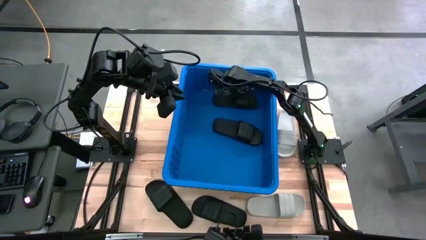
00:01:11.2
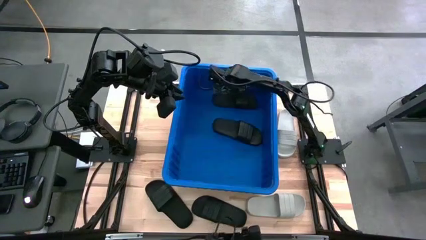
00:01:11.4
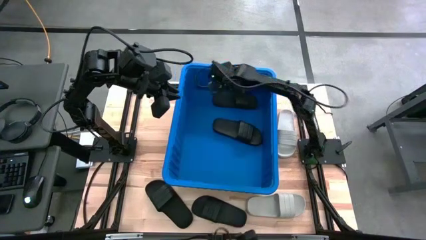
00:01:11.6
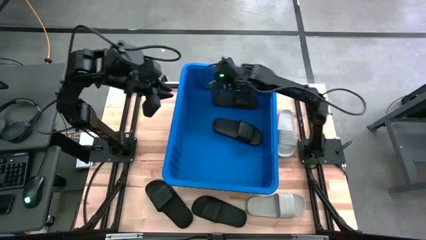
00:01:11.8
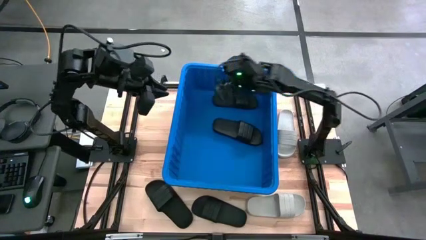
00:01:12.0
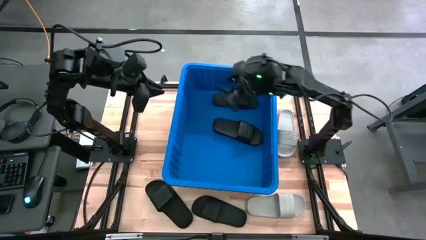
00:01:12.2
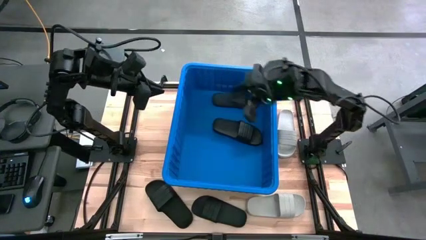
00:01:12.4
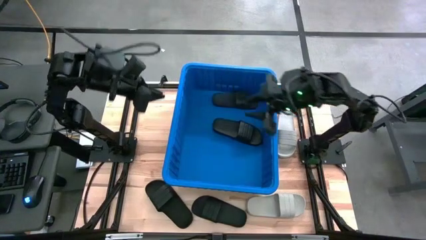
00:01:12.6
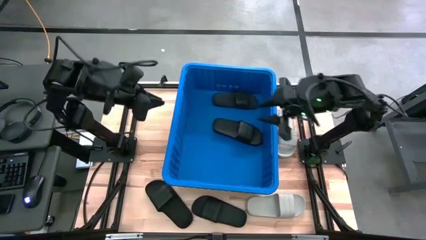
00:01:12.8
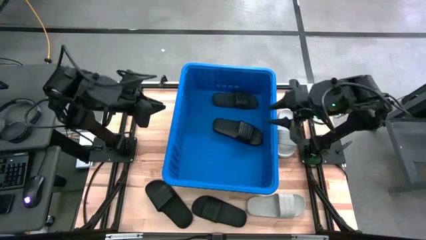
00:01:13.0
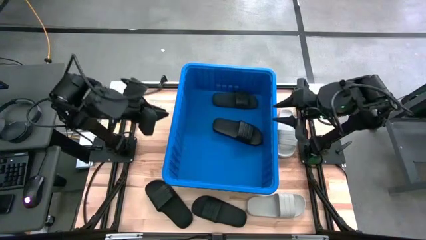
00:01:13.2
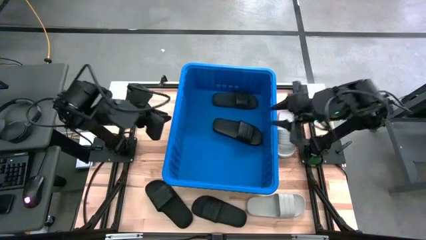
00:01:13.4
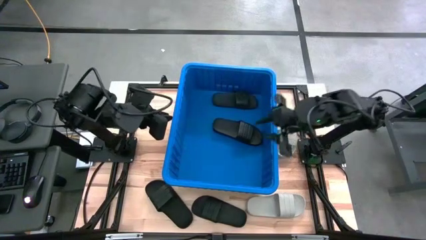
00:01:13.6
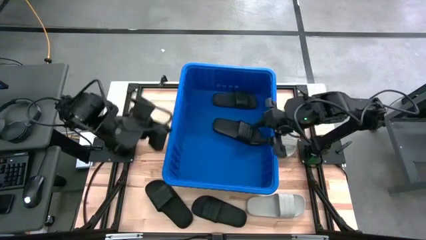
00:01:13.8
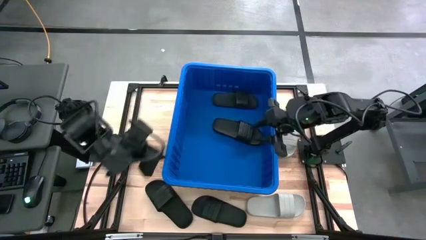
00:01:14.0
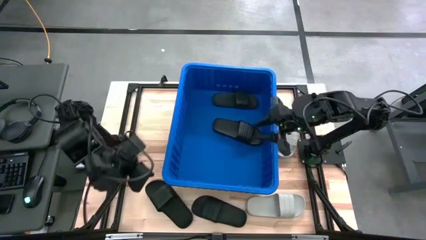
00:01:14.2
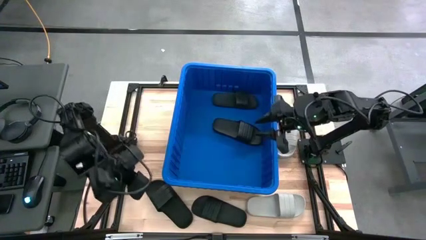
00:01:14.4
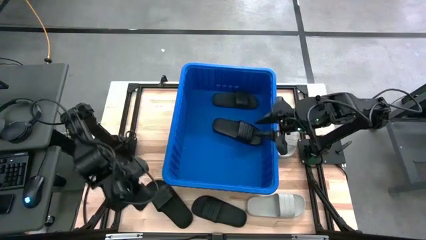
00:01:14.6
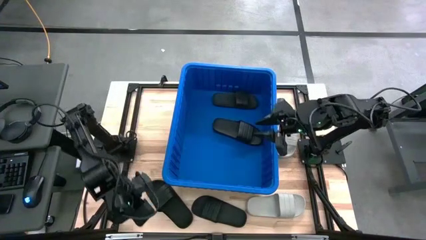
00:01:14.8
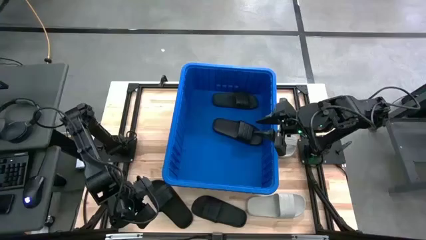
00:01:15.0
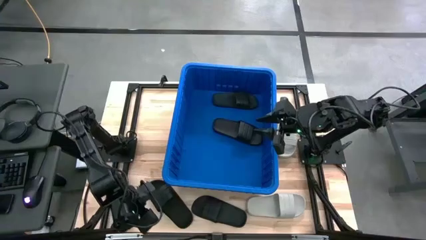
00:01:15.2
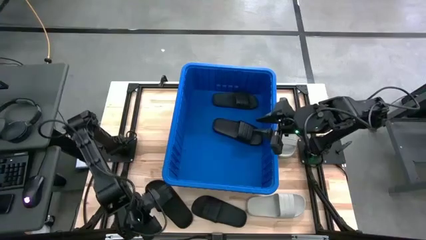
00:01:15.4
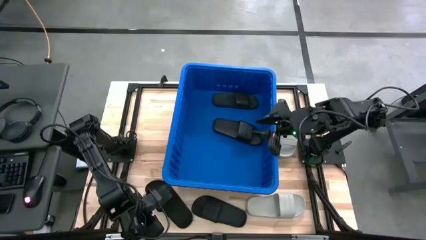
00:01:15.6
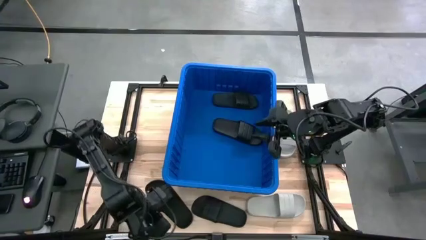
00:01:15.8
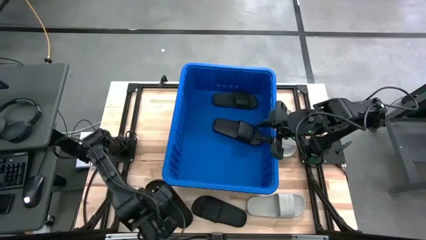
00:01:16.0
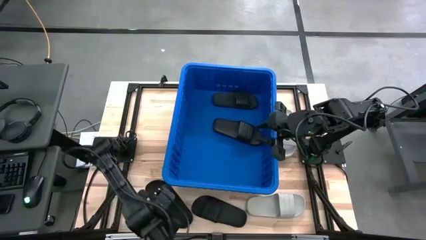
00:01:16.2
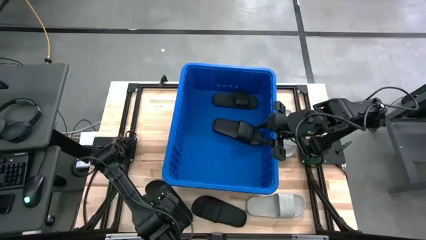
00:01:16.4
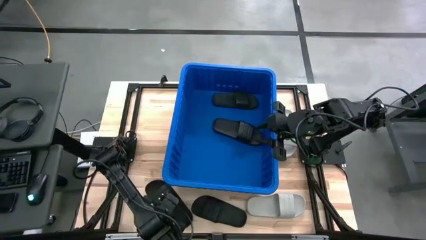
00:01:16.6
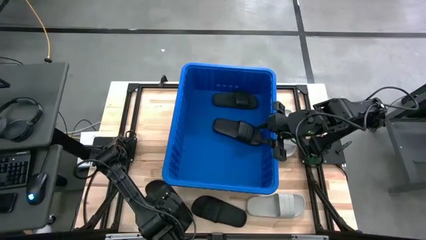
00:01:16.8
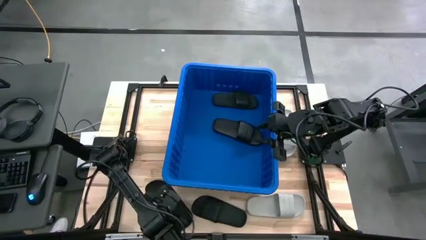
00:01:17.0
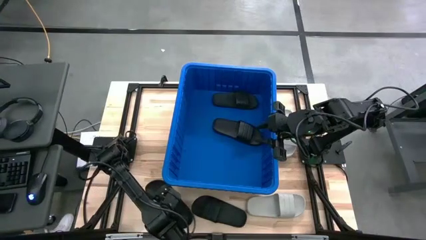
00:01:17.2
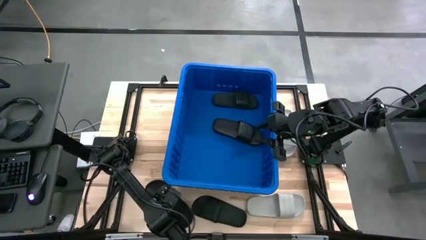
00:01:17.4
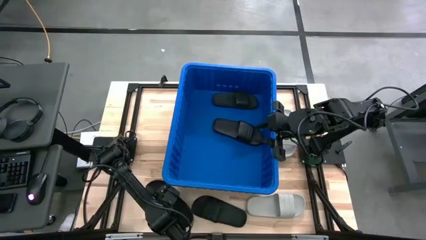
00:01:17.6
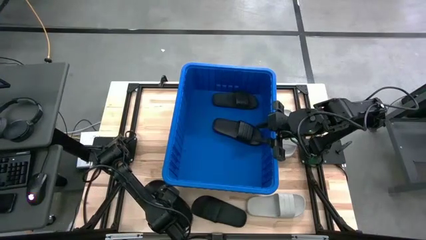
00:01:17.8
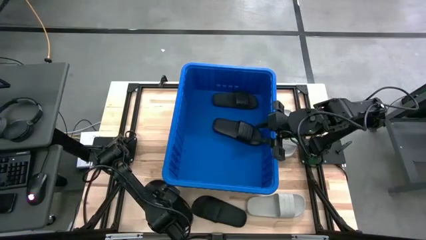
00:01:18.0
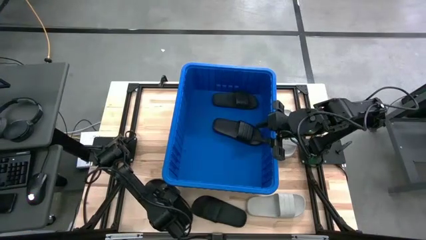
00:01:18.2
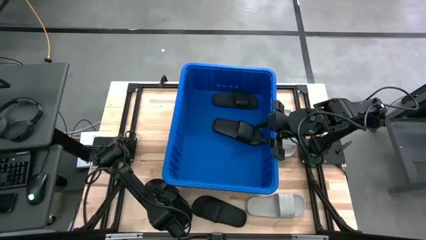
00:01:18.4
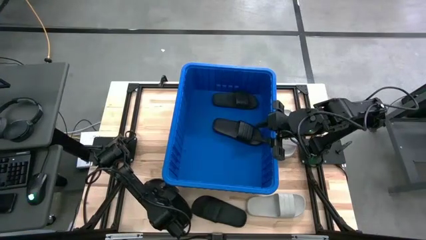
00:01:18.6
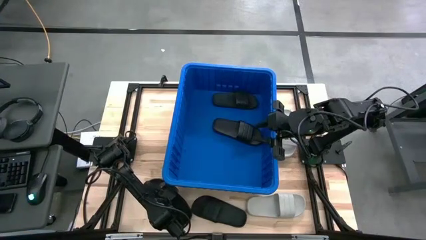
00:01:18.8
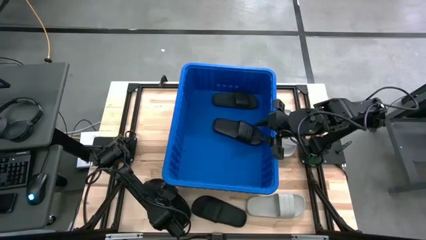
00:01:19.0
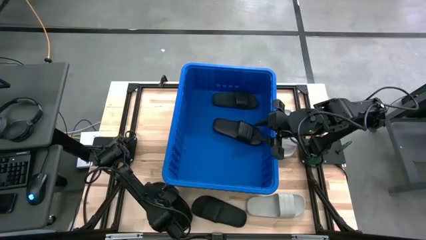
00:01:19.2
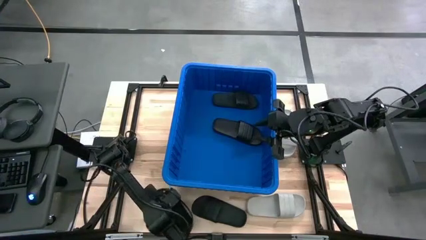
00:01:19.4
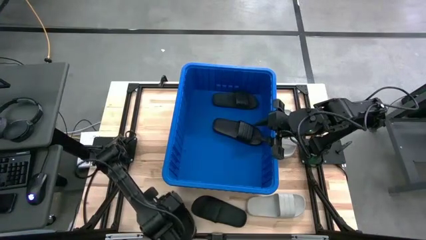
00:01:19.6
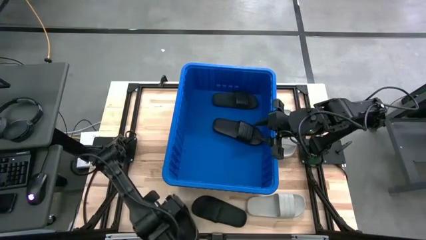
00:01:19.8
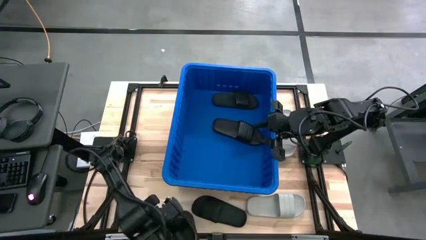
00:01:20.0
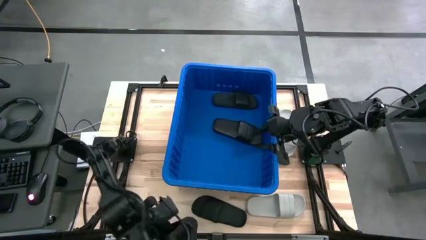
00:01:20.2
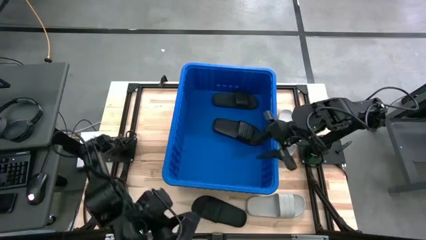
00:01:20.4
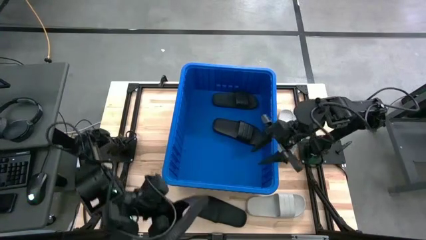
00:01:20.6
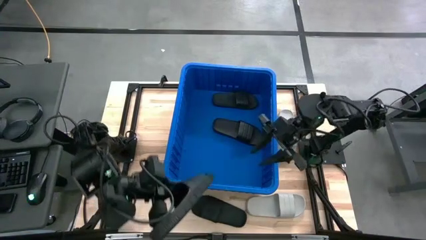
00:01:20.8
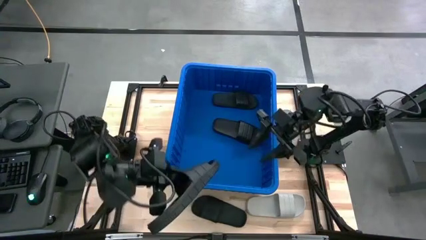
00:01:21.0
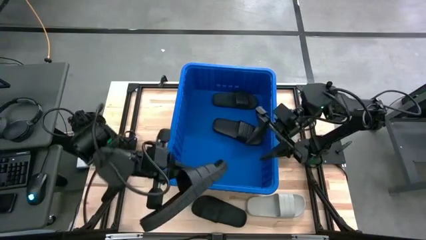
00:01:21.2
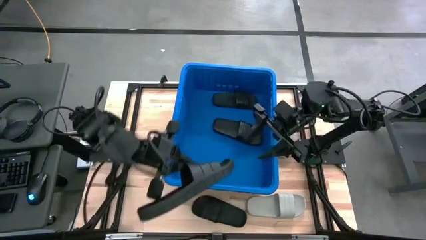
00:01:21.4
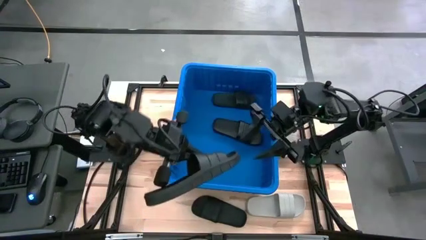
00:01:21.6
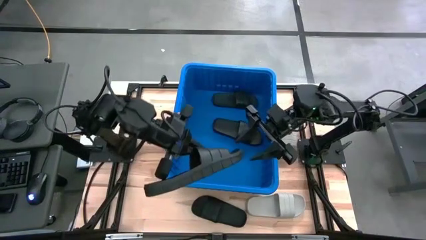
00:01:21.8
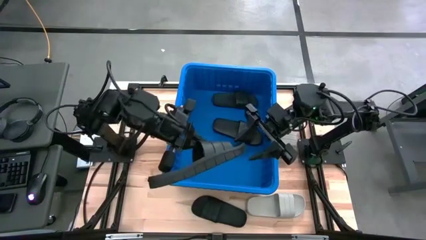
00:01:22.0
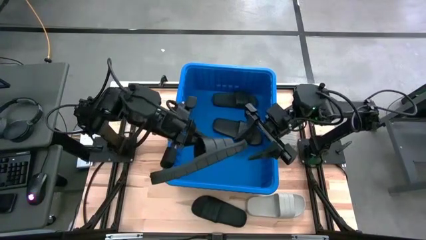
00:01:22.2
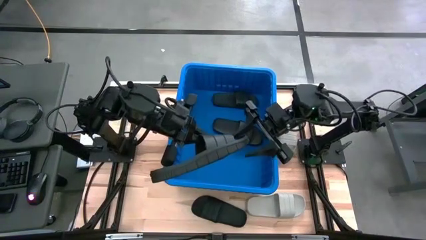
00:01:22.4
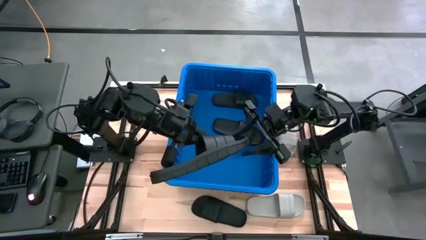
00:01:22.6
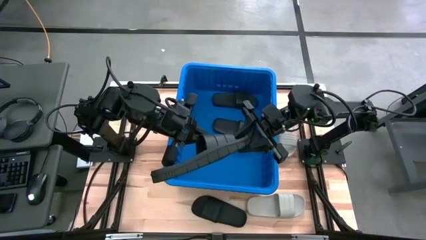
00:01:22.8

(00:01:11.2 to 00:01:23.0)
Task: Pick and place slides into bin
Stack the black slipper on the bottom black slipper in the blue bin

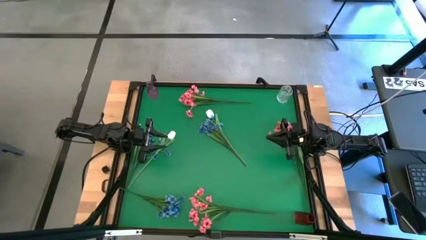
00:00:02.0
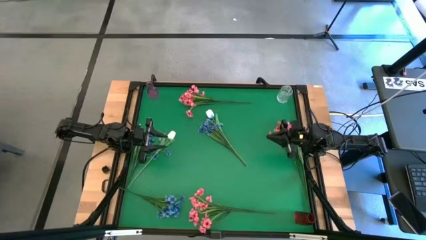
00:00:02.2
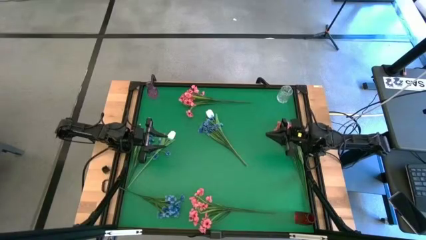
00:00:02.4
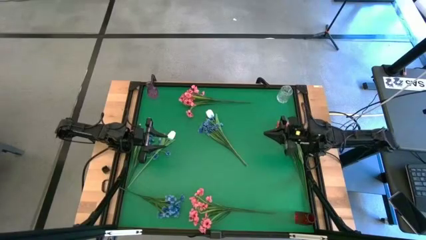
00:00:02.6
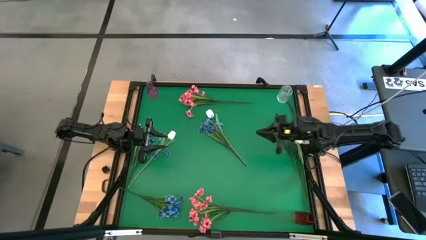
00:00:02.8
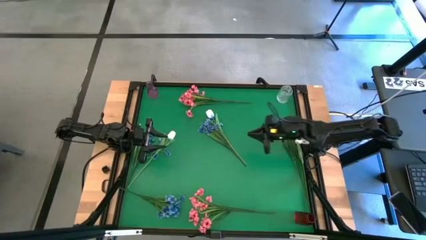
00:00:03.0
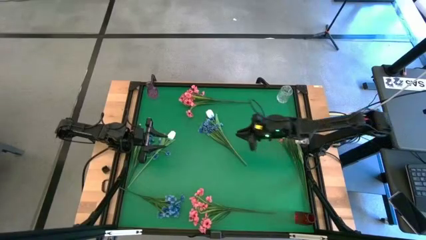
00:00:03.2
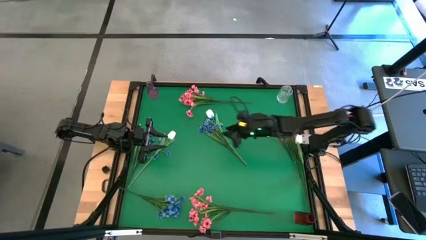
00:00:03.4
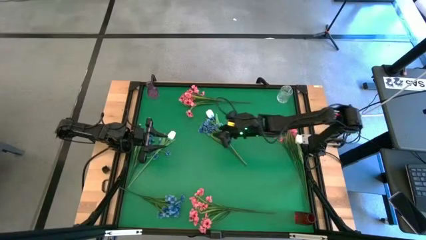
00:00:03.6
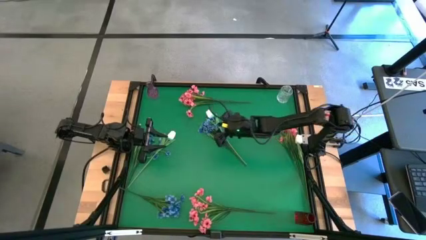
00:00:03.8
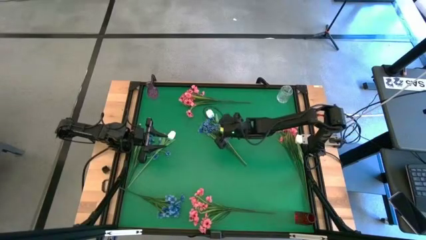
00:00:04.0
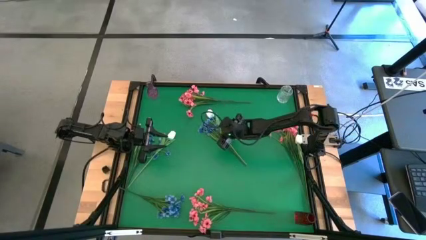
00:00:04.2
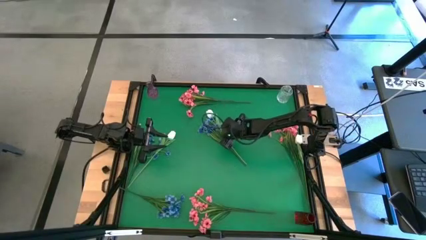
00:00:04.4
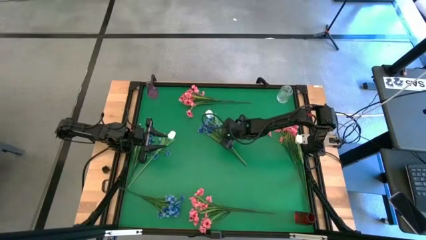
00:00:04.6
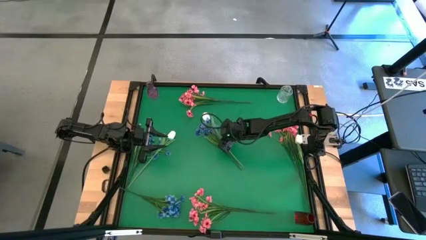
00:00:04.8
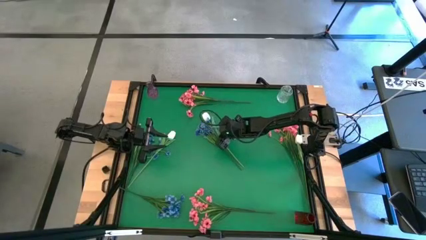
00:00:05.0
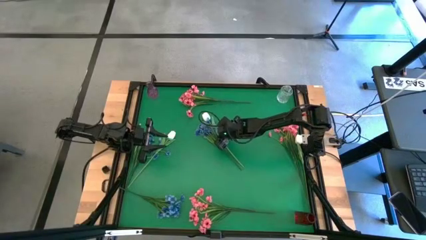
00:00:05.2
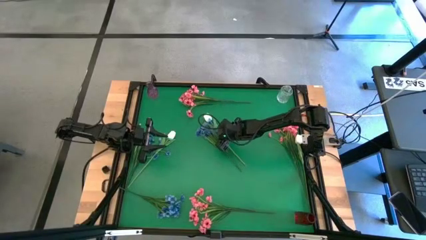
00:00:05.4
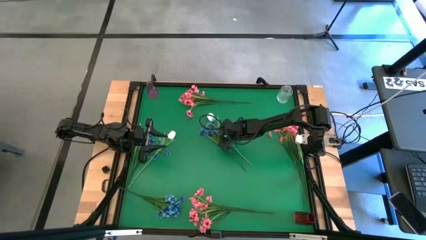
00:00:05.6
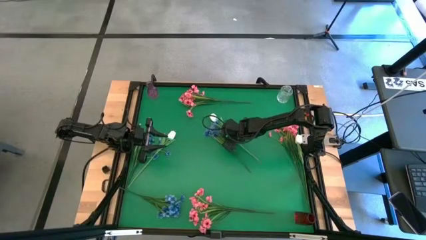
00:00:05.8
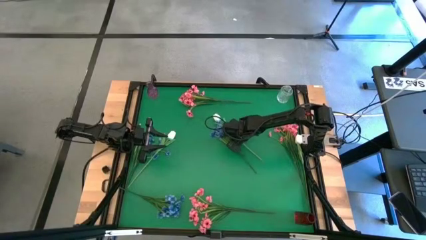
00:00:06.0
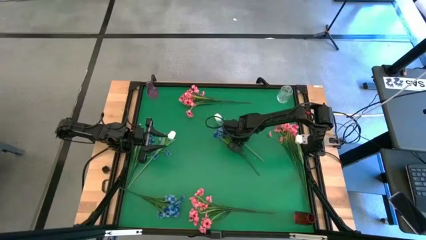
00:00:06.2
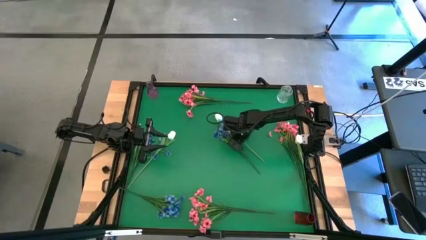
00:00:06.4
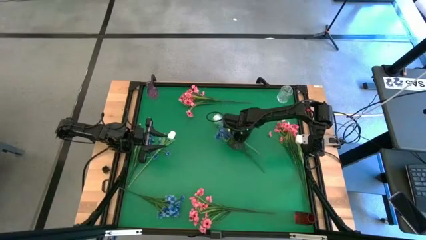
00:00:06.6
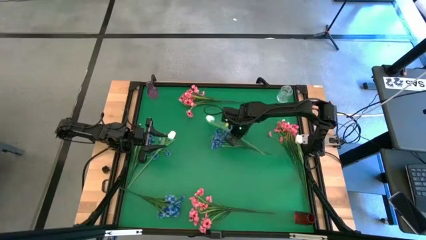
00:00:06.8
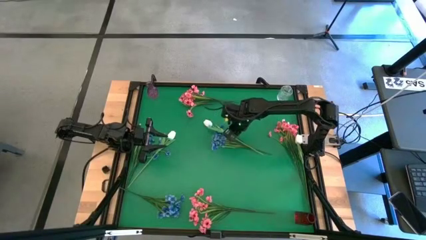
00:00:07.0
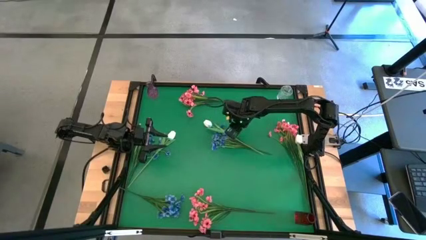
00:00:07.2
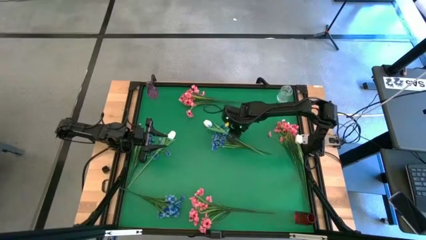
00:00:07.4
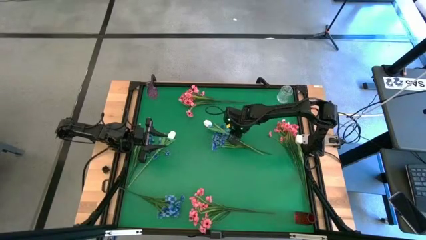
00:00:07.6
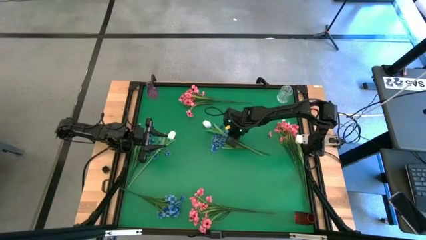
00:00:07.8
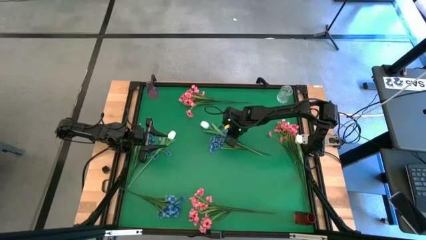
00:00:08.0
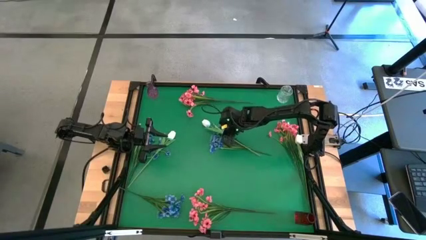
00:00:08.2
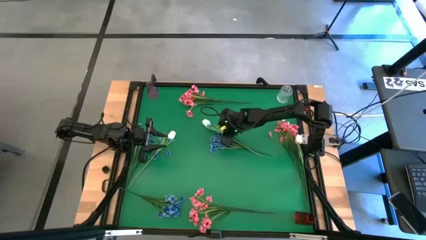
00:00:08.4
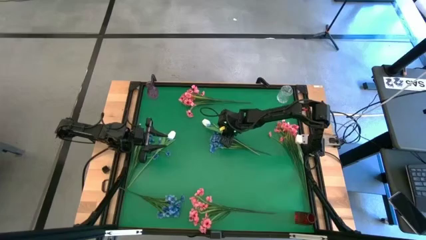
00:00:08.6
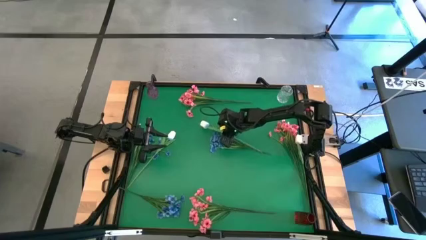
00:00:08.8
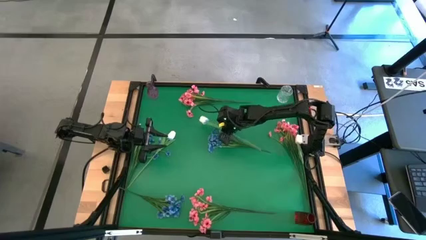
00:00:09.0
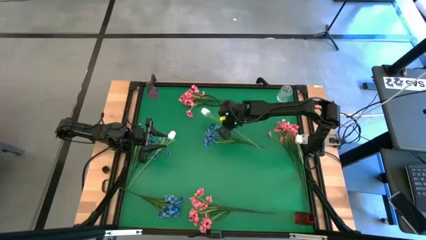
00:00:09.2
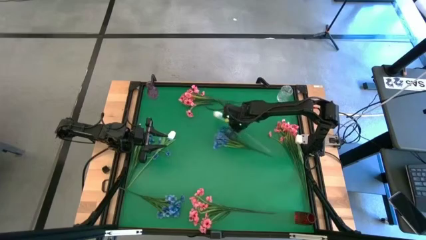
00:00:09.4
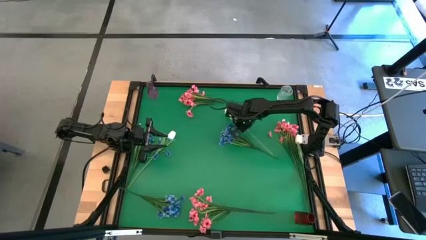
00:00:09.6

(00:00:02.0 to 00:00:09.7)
Task: Sort flowers into vase by color
Put the top white flower into the transparent vase
